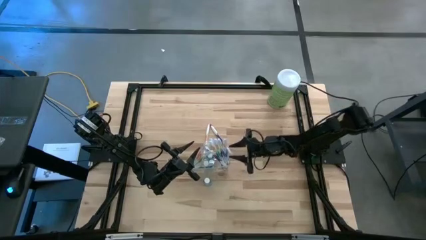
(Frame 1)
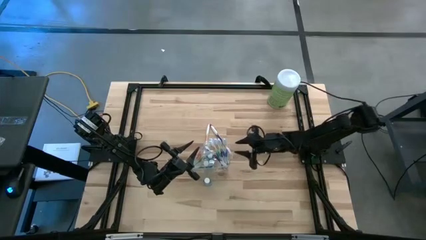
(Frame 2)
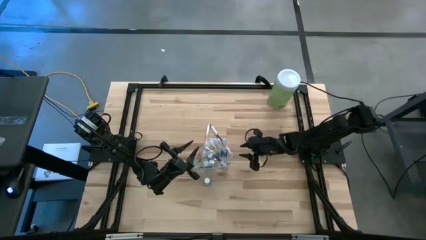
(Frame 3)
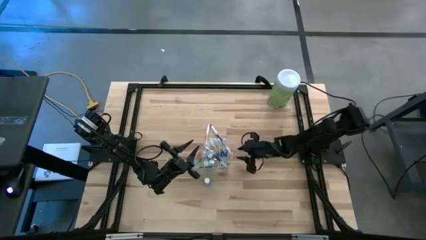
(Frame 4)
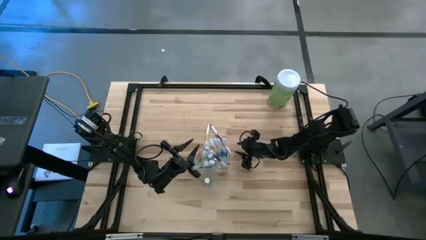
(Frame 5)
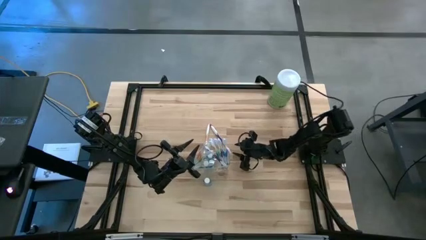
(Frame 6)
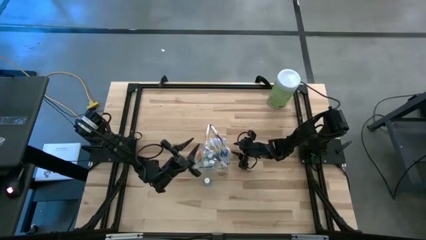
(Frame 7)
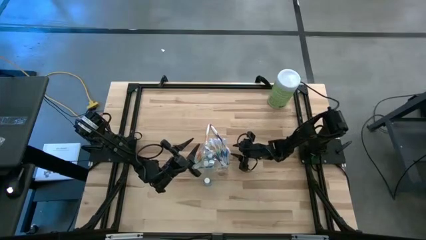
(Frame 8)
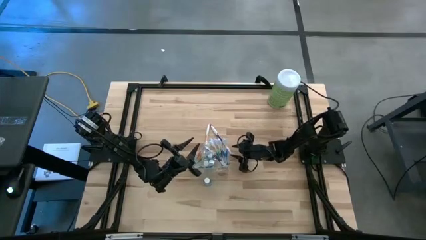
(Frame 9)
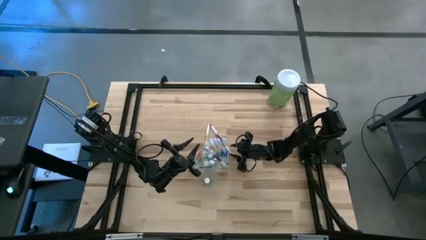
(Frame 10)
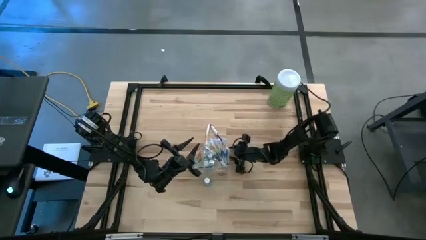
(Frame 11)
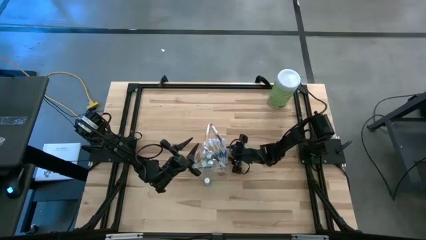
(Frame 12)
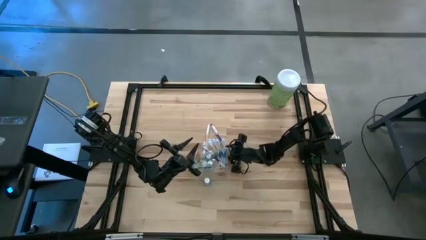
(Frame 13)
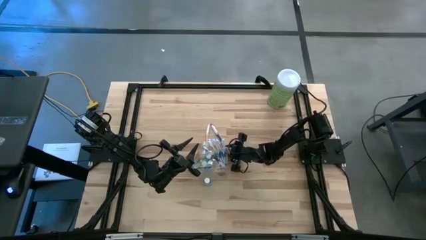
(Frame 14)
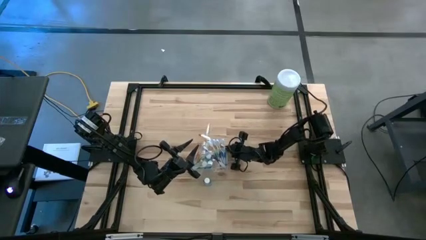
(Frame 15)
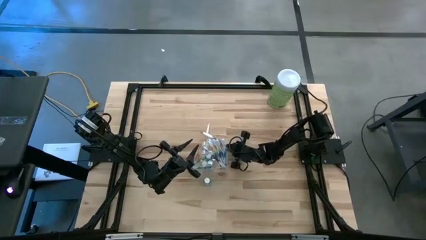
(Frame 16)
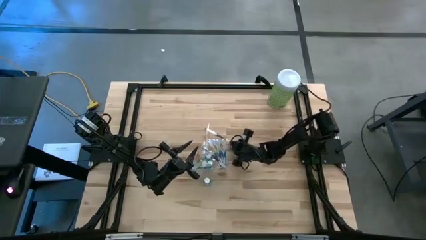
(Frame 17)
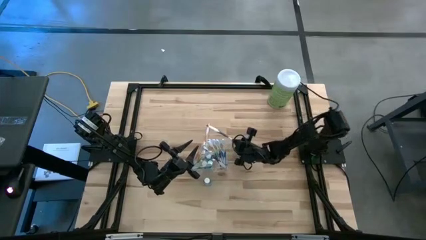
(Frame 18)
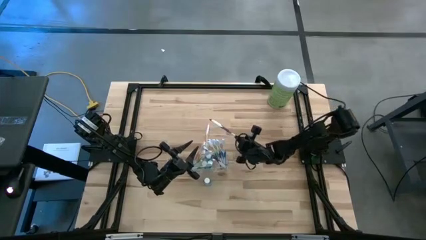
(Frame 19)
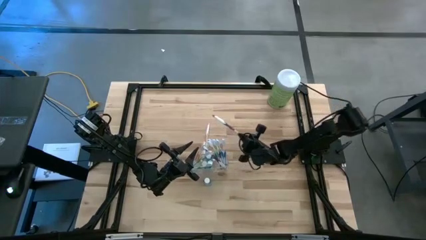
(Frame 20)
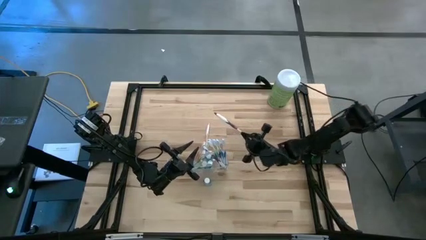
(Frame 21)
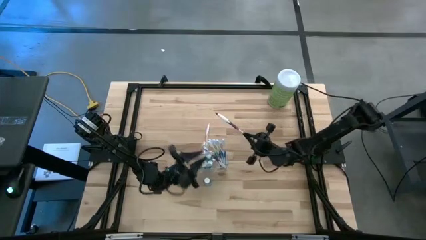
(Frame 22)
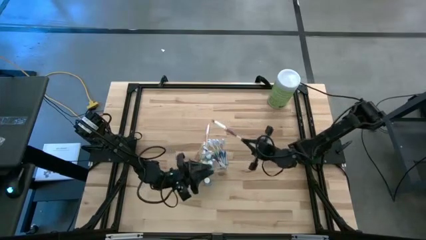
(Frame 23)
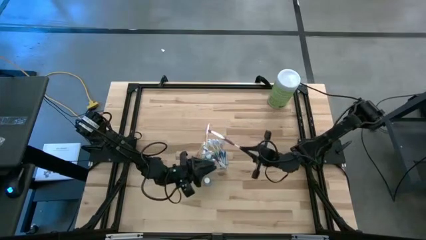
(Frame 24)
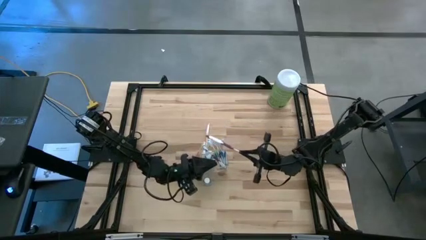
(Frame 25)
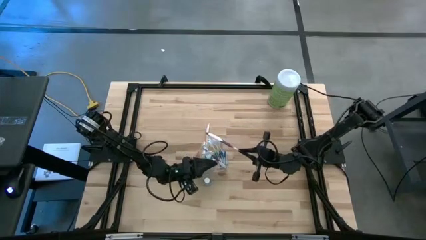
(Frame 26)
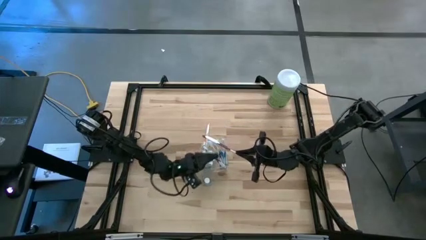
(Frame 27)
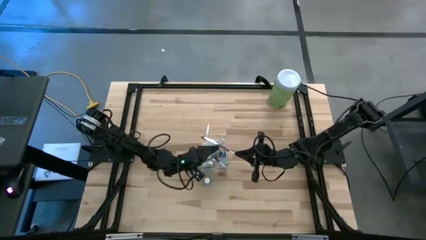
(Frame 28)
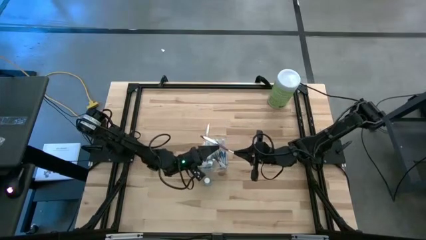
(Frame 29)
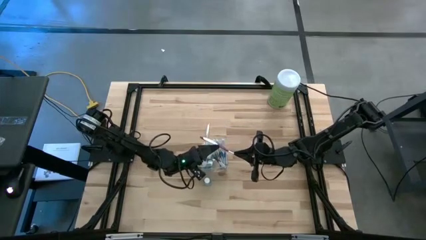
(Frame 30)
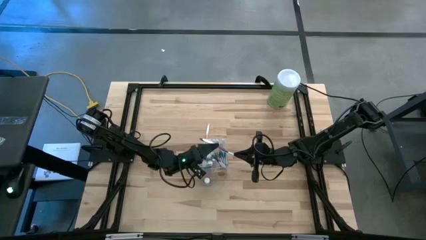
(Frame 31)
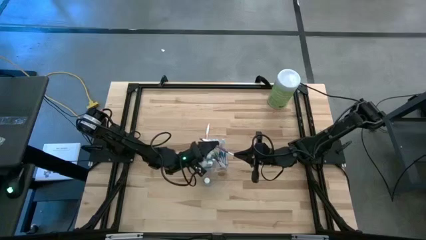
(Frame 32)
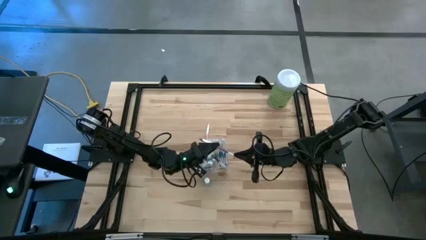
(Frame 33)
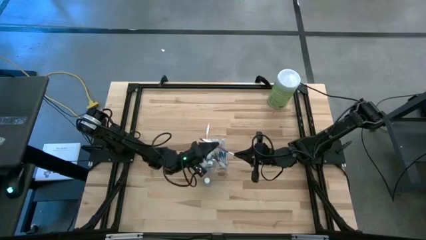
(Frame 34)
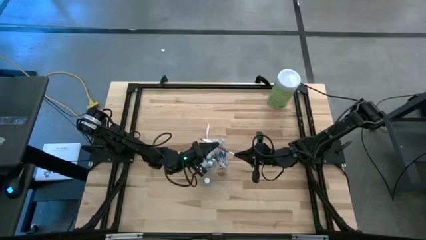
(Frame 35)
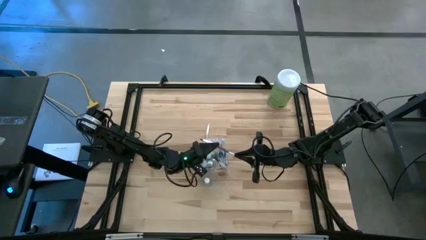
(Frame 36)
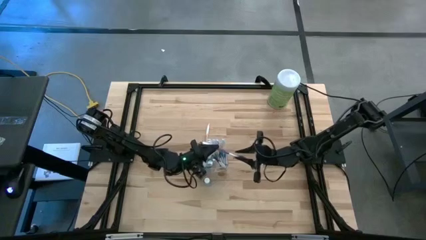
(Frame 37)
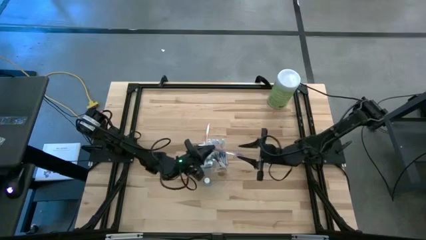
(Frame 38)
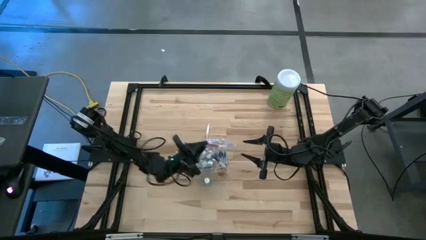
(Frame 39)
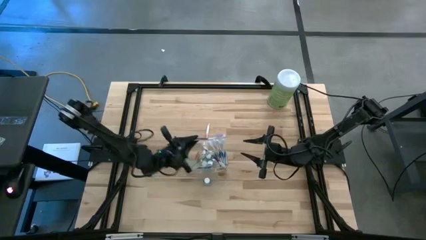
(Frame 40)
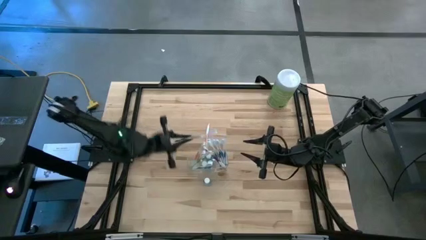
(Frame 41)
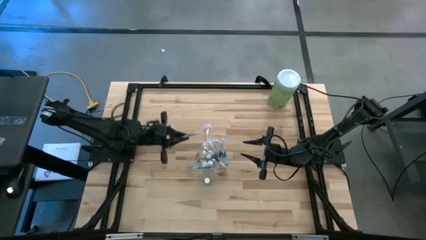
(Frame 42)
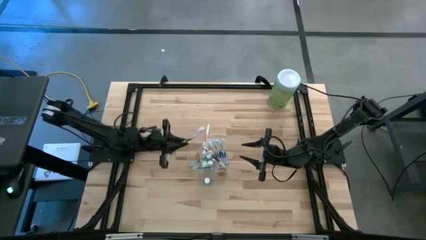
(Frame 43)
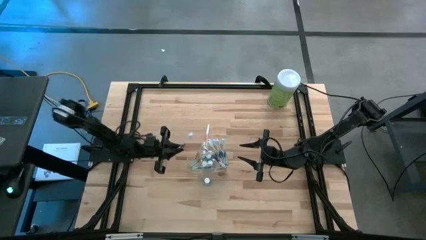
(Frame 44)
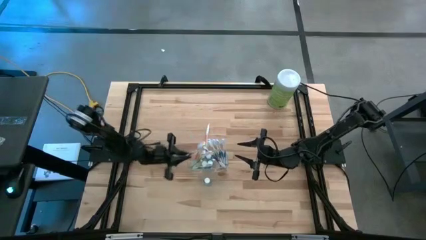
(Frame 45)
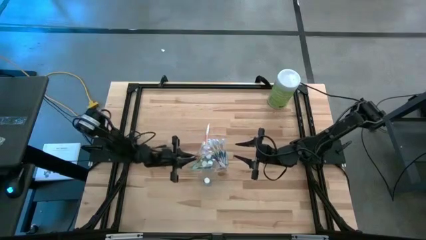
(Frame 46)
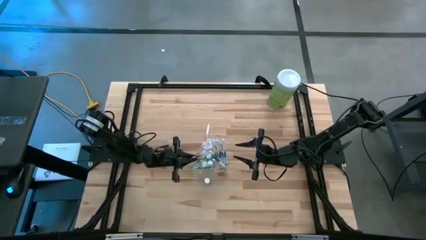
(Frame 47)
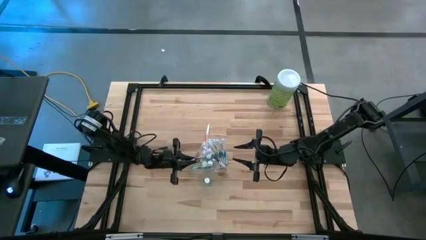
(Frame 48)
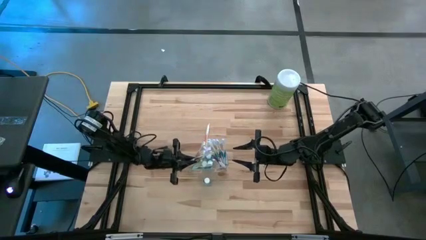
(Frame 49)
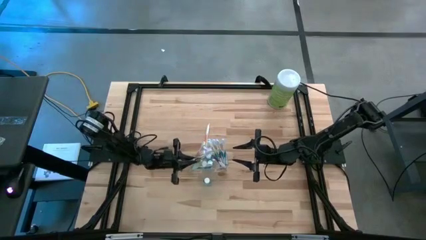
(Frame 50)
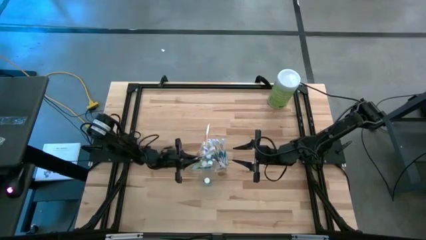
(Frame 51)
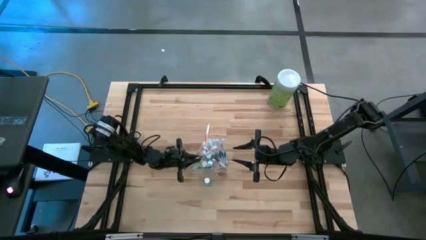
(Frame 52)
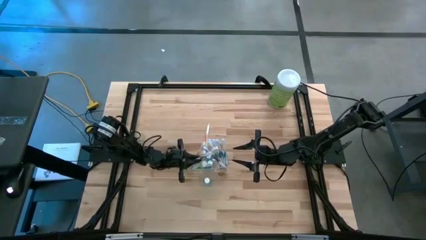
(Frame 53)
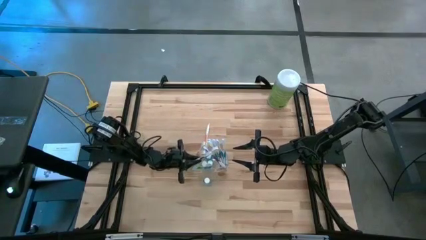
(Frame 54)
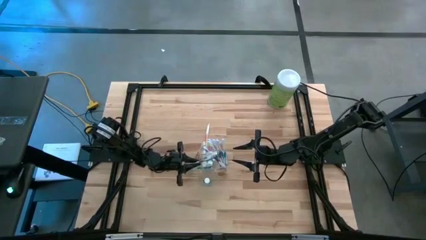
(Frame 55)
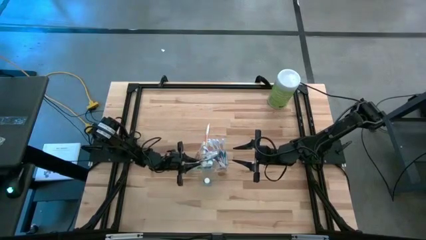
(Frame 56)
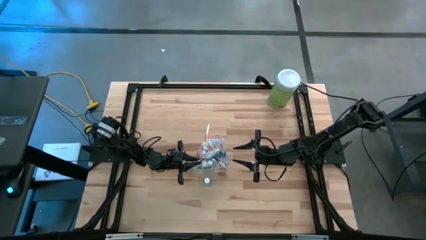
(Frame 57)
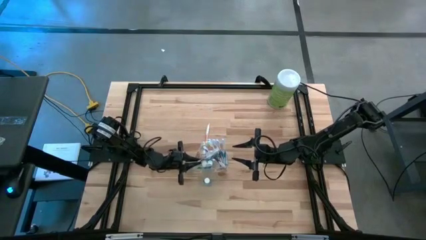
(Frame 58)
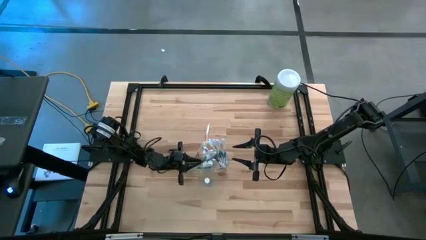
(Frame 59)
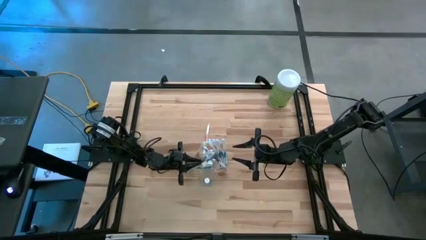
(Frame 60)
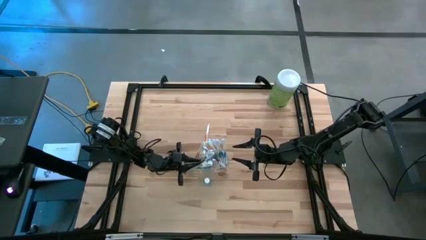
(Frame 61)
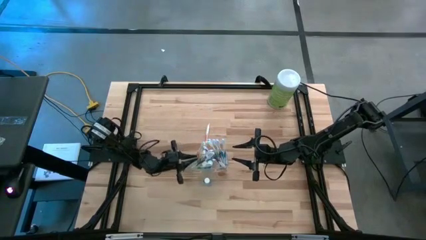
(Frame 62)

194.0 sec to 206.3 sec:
Task: Pick & Place toothbrushing station
Put the violet toothbrush into the transparent organizer

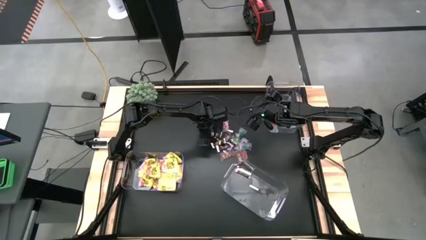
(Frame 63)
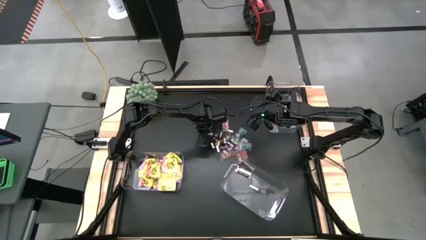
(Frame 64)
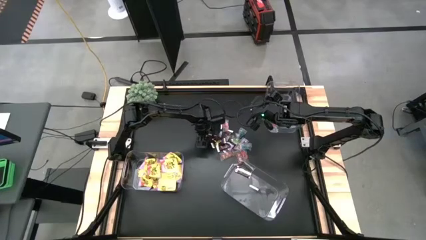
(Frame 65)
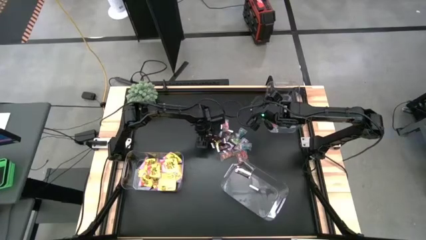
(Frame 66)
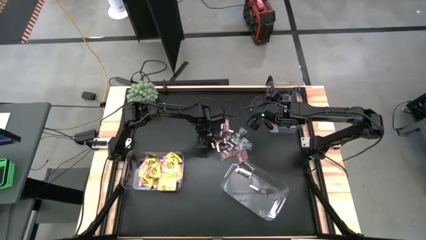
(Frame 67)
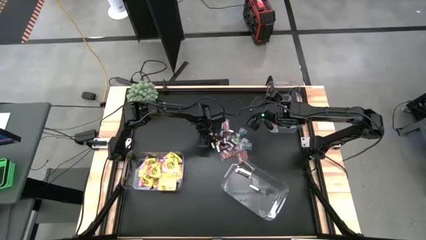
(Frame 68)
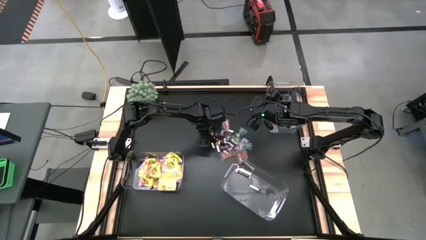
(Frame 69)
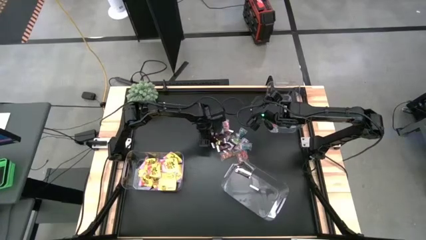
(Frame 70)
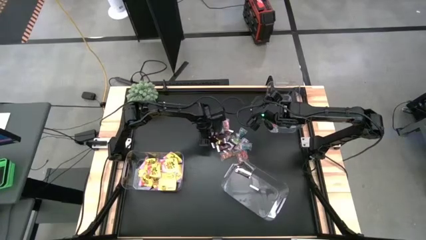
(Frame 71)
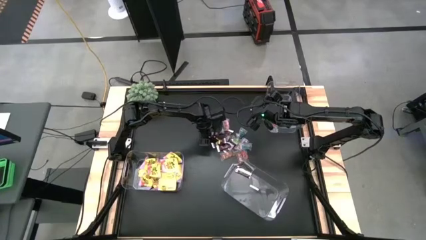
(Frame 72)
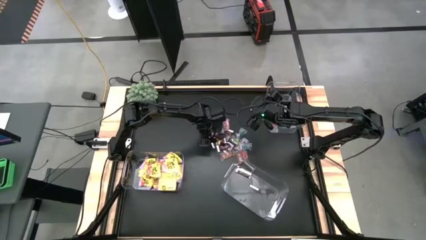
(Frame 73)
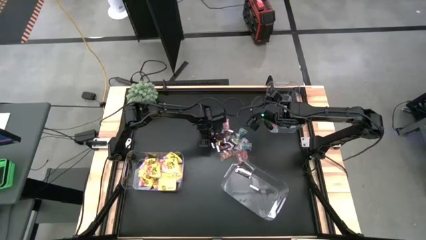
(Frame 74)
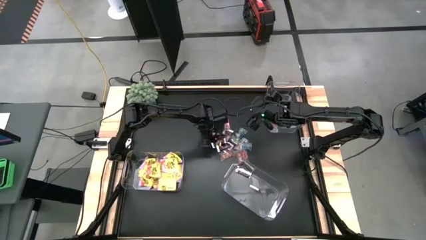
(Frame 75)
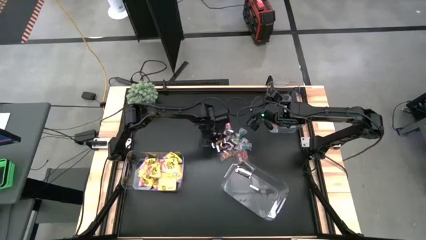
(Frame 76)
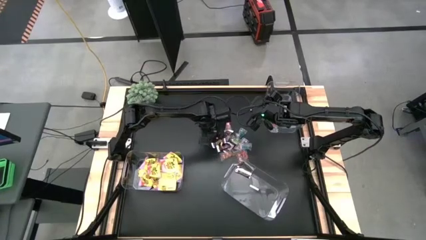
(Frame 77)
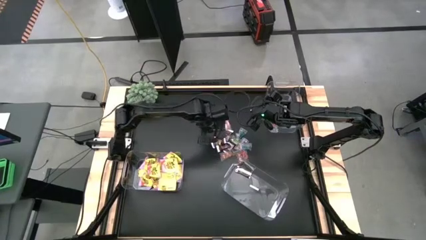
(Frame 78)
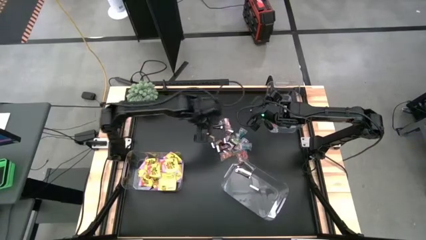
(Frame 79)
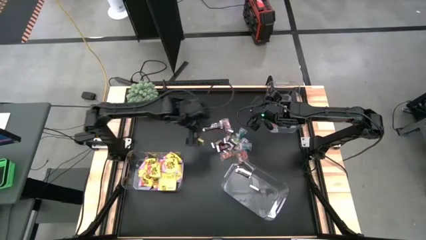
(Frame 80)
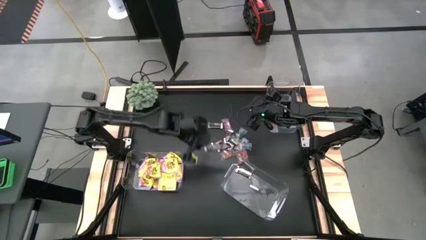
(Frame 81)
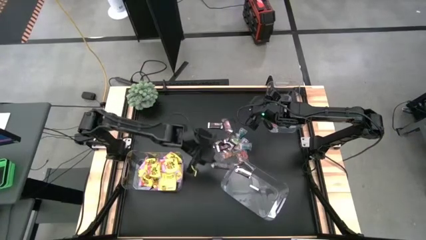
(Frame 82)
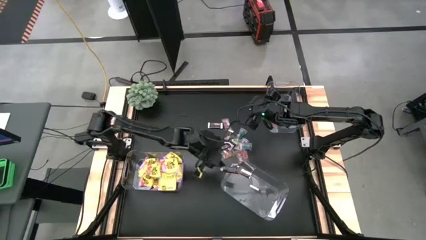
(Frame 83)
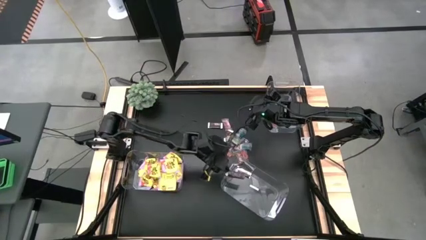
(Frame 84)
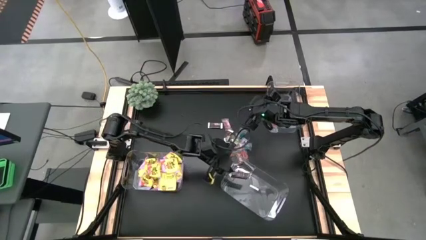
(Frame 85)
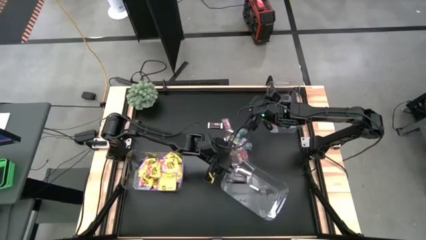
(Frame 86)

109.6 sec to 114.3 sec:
Task: Sort candy
Put the brown candy in the bottom right transparent container
